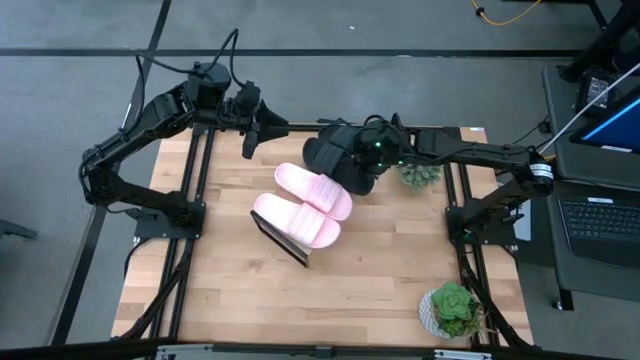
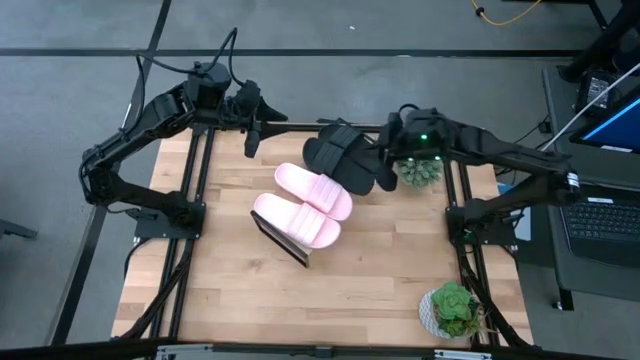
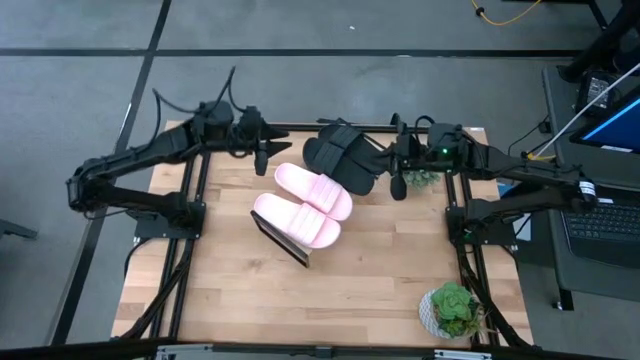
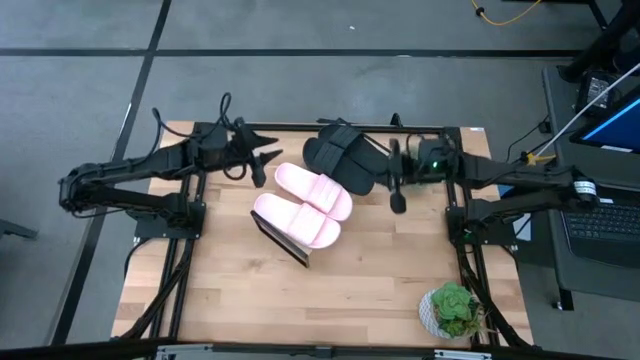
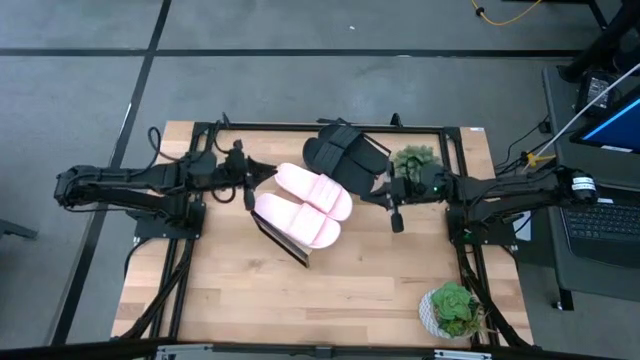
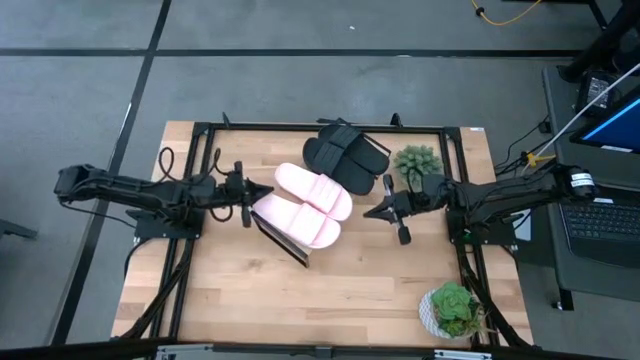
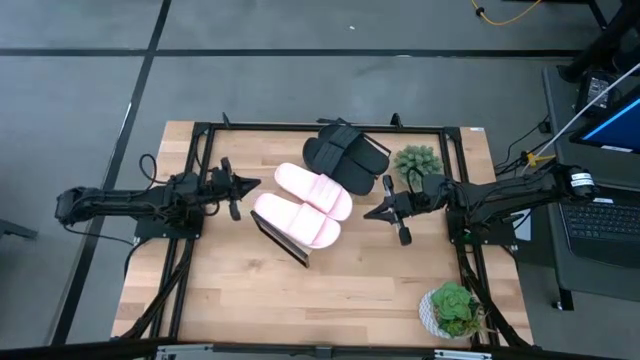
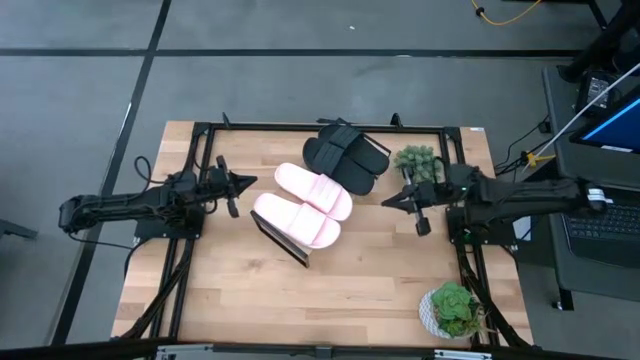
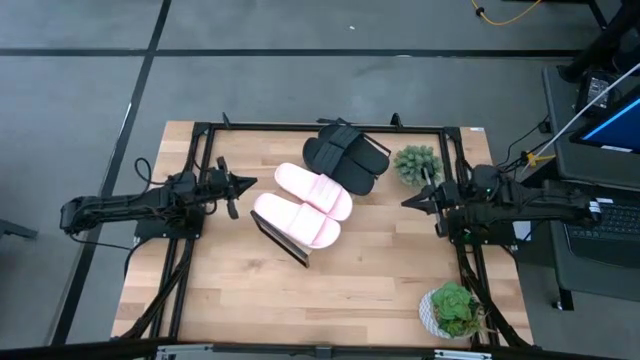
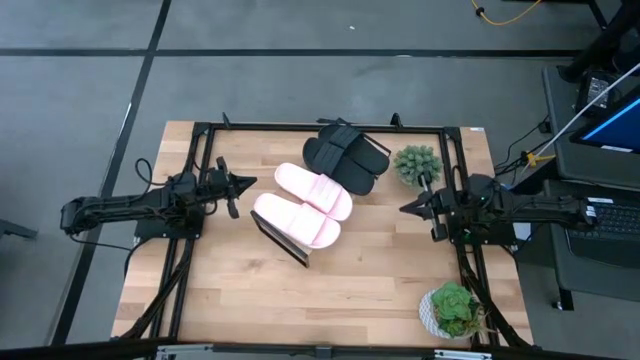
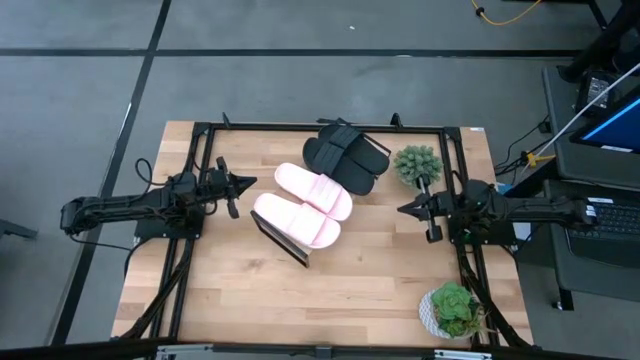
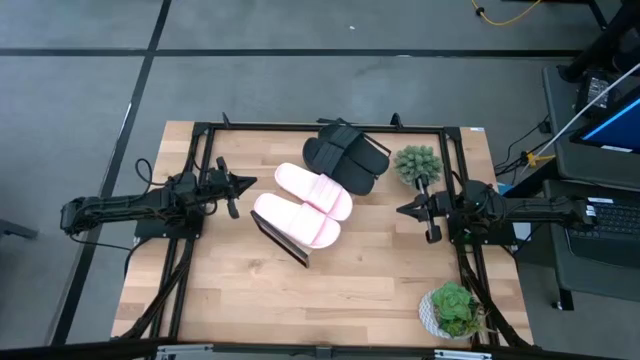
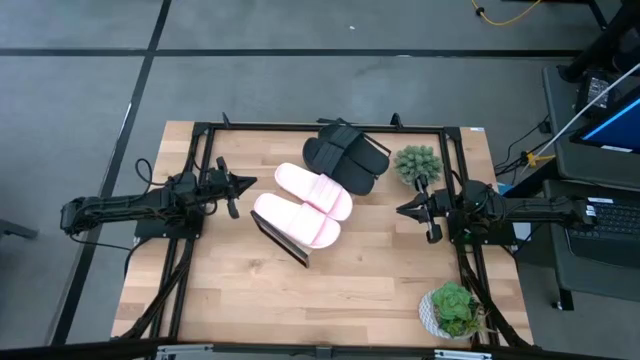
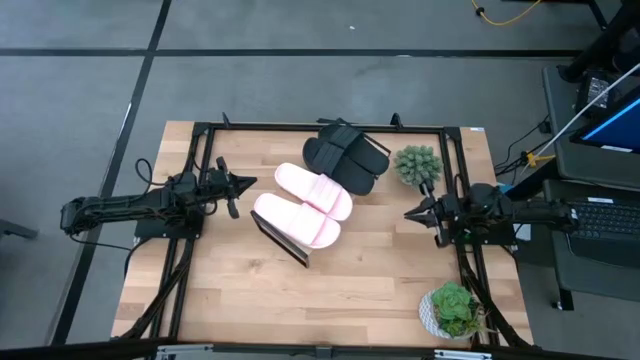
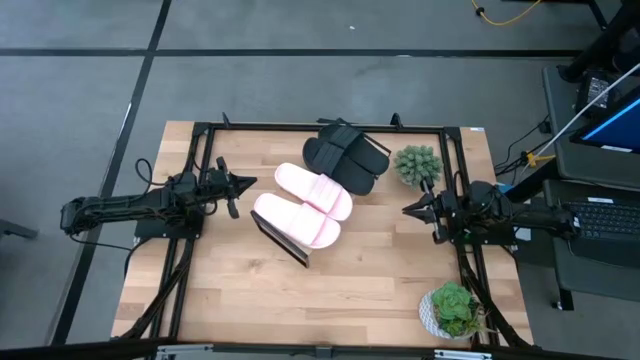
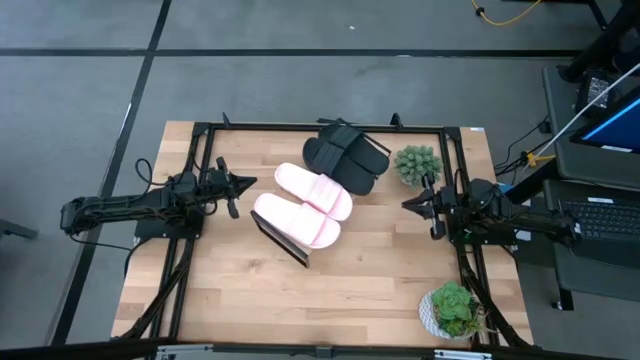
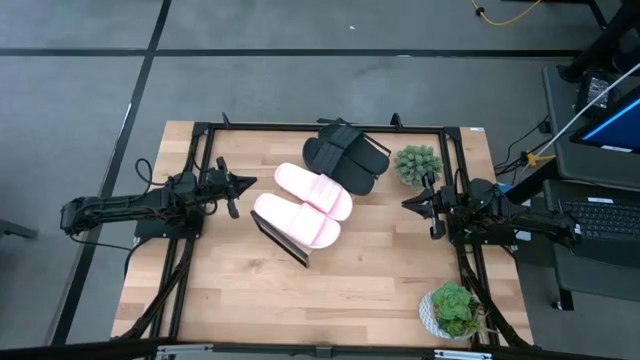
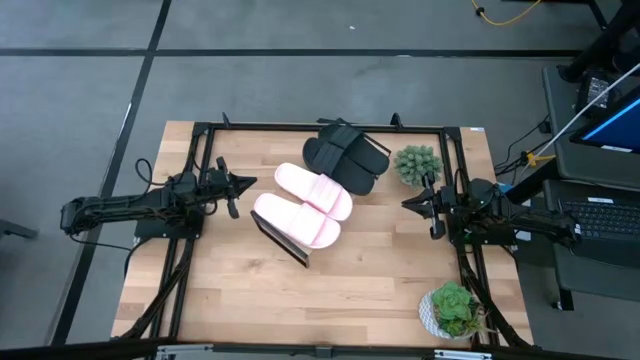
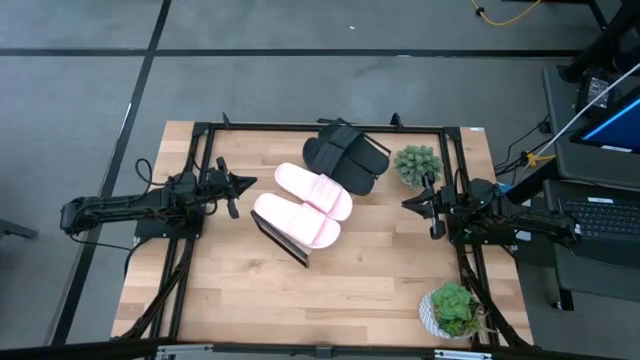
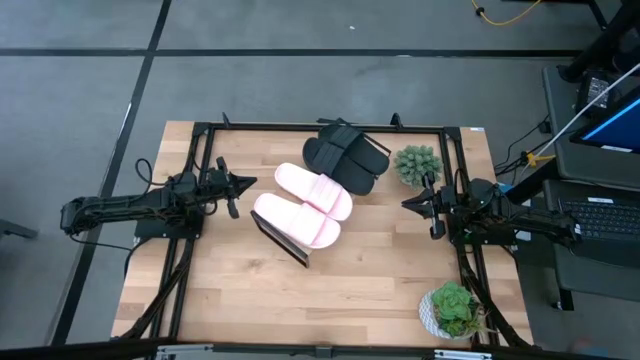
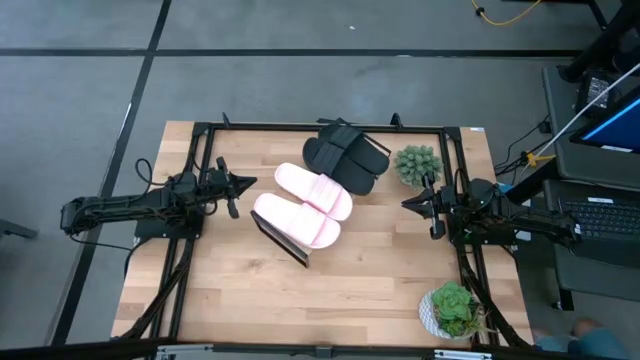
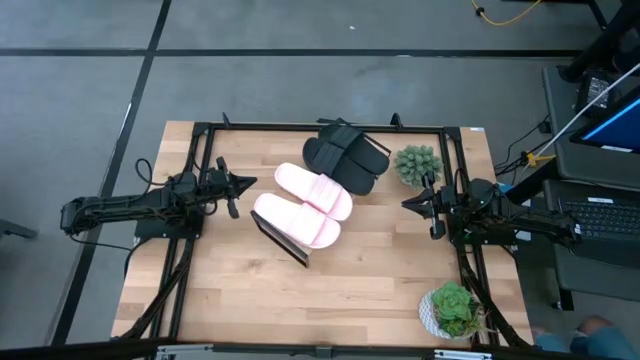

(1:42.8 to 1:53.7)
Task: Pick and place slides into the shelf
Return to Home Position

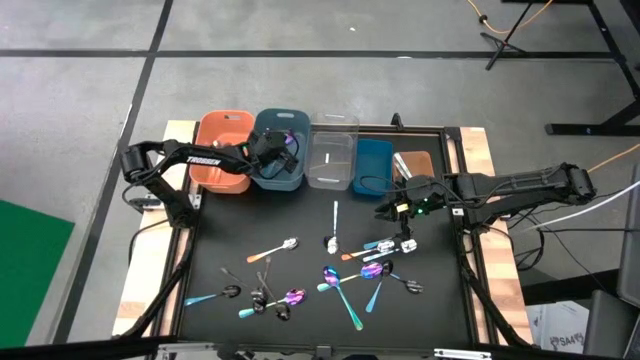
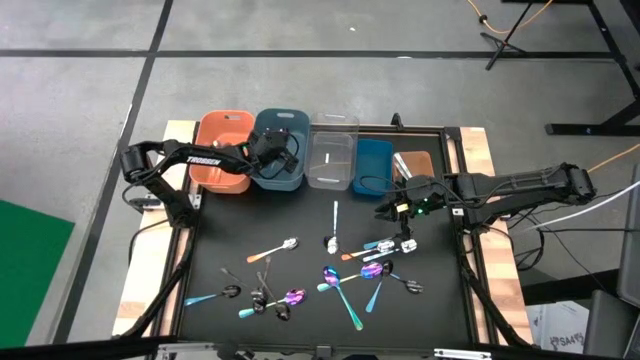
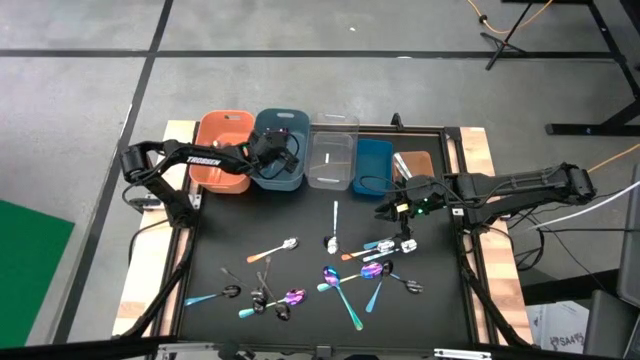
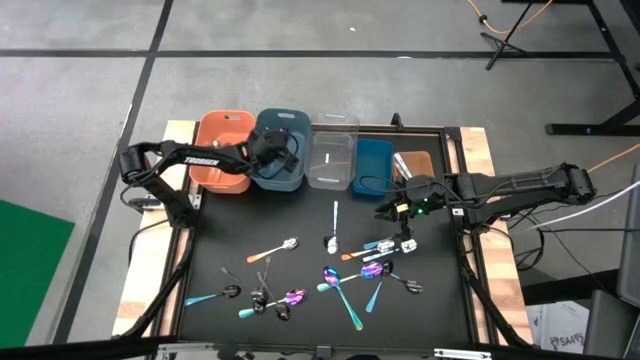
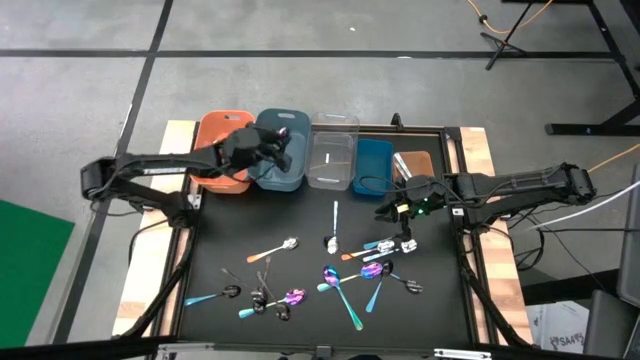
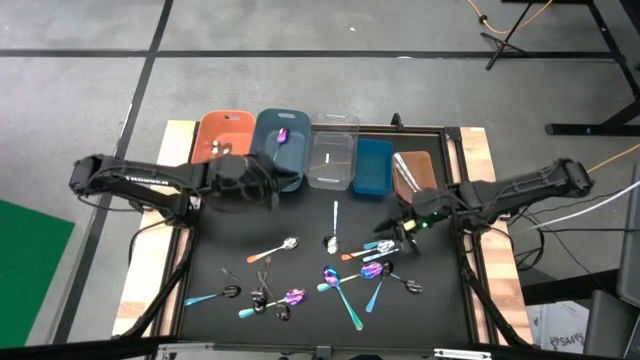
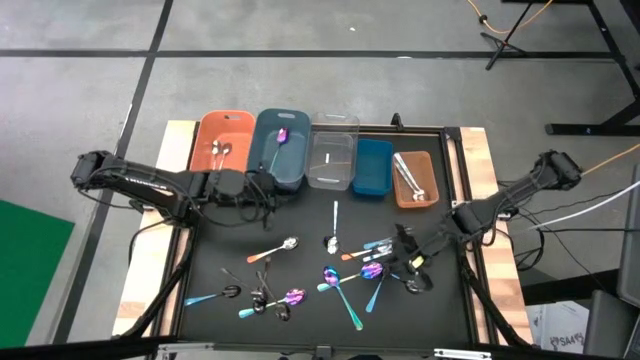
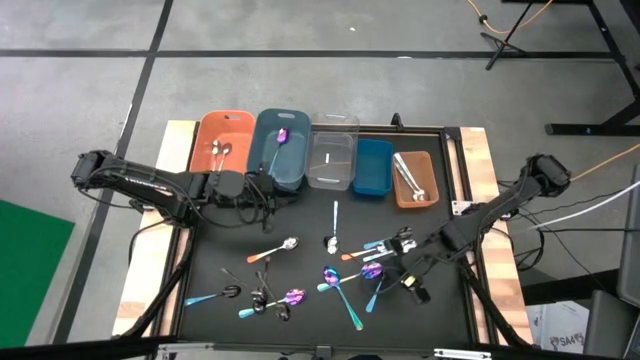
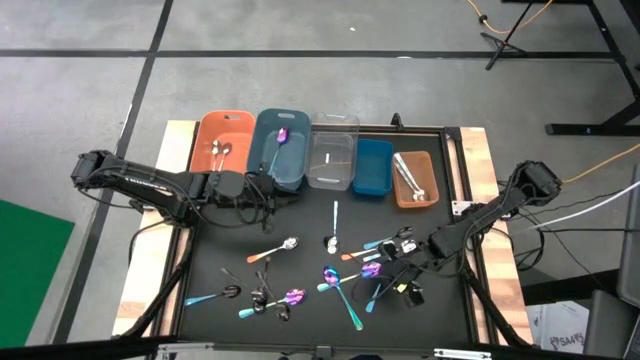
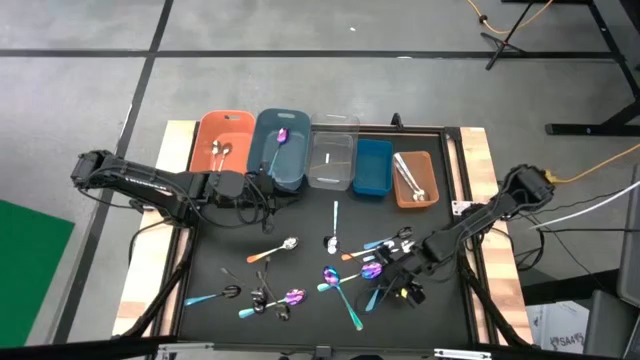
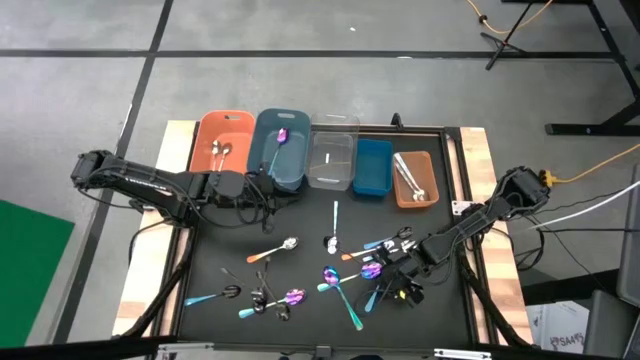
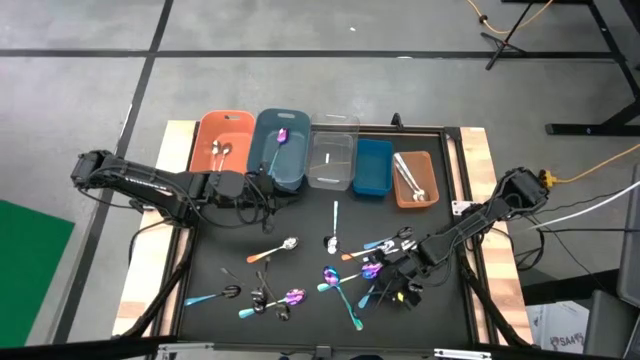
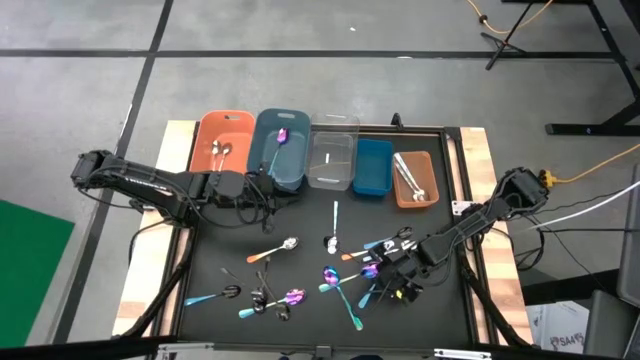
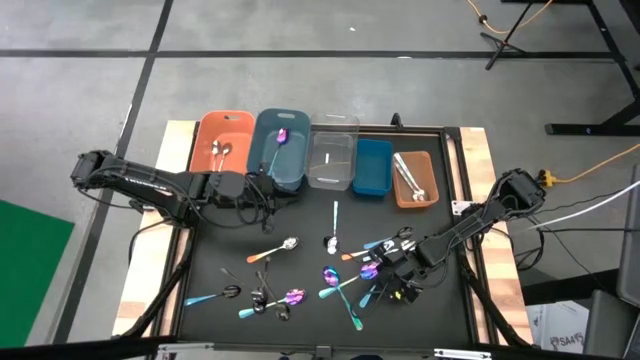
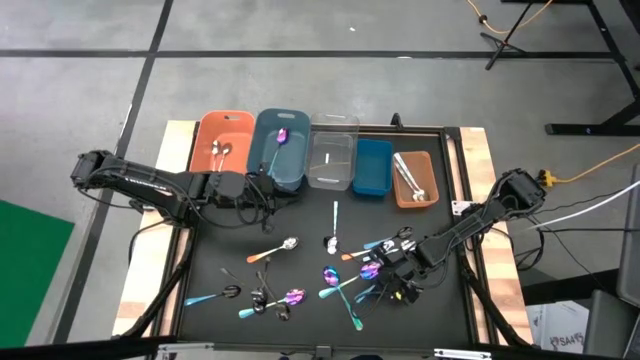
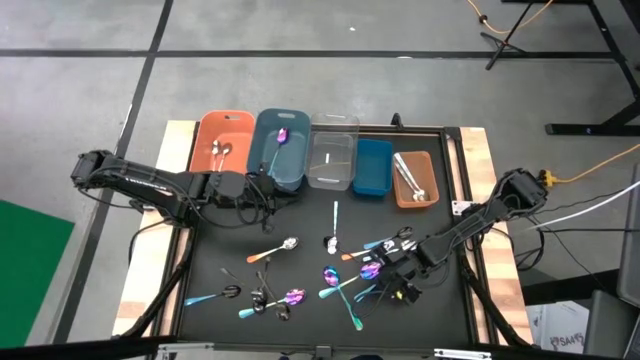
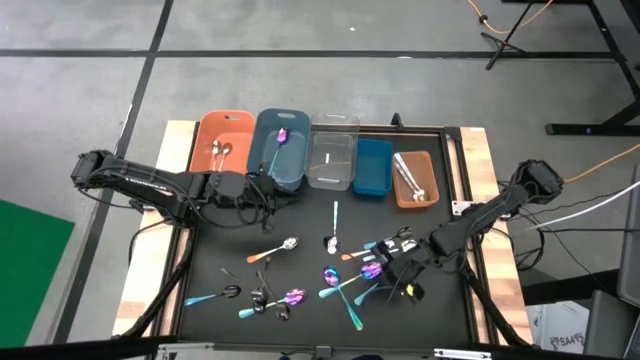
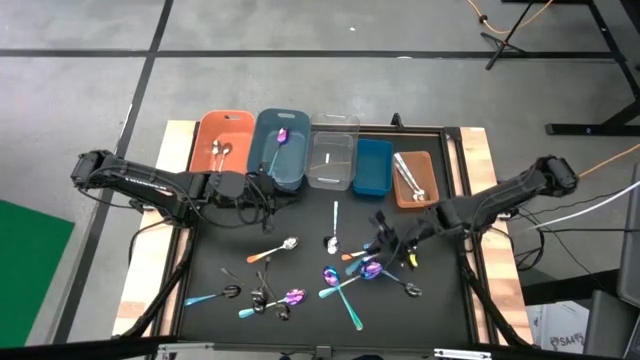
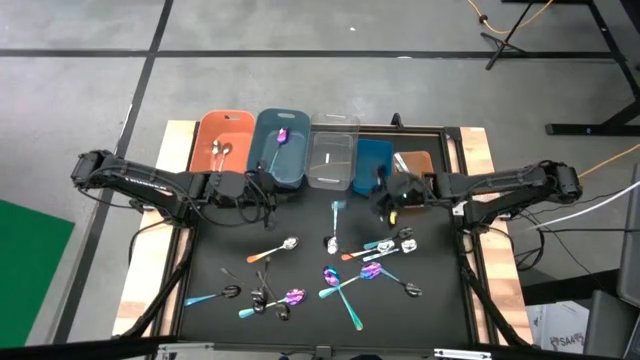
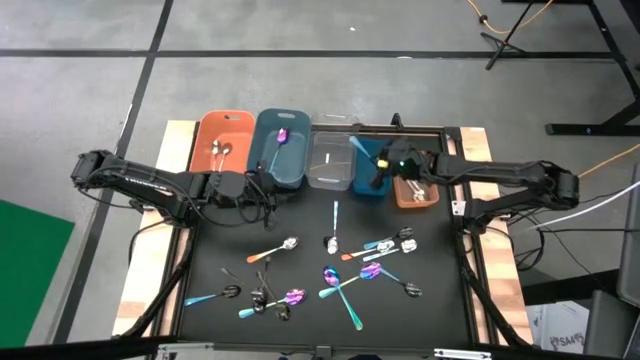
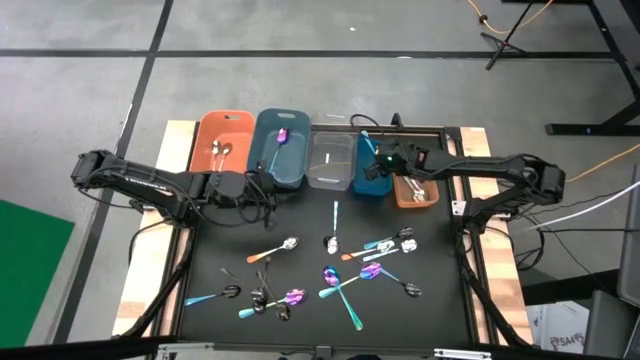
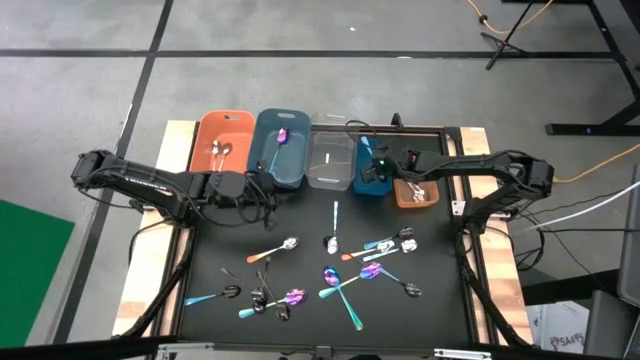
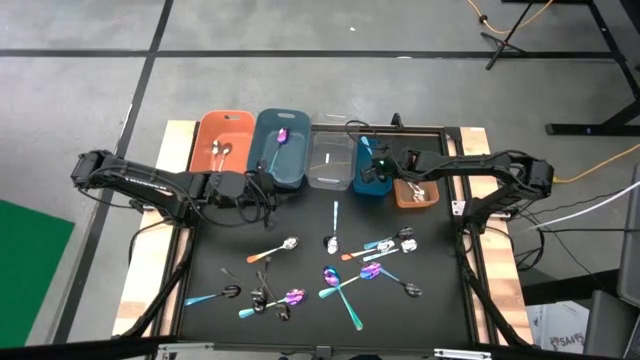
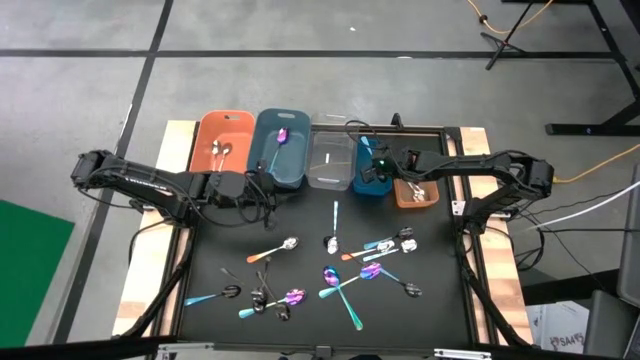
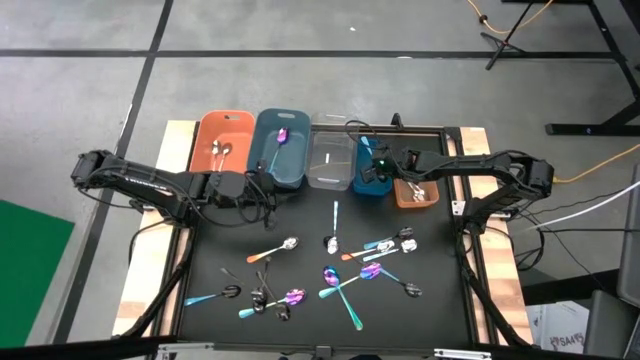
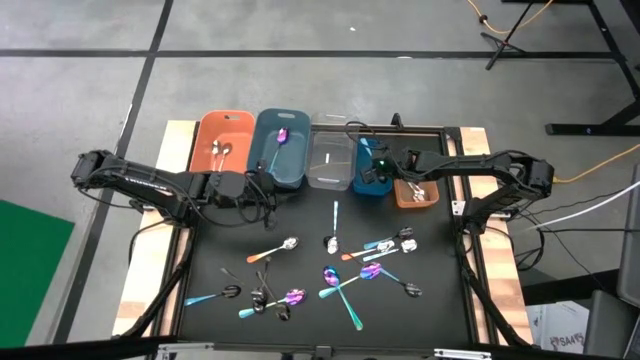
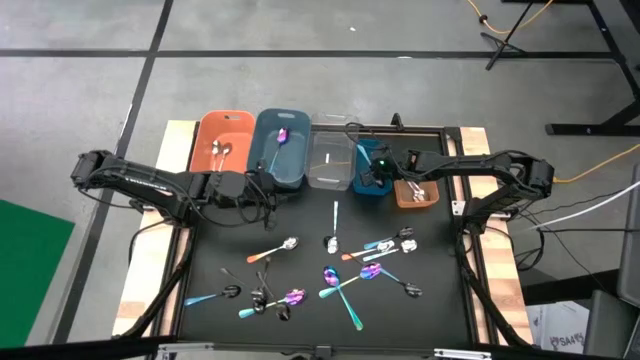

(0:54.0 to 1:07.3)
Task: Sort silverware by color (type)
Put the light blue spoon into the right blue bin
